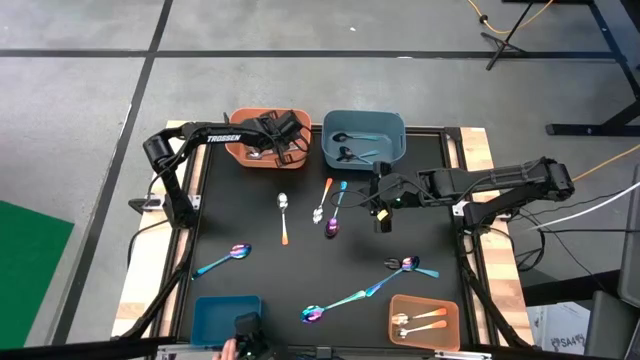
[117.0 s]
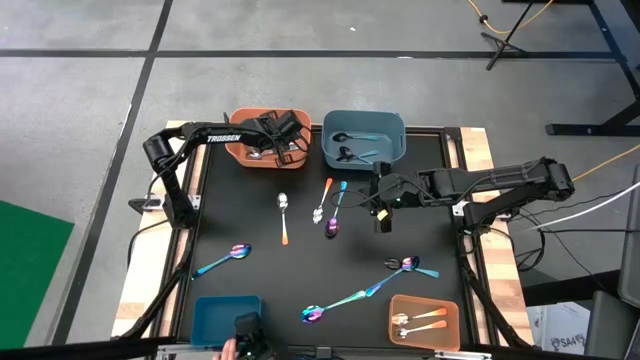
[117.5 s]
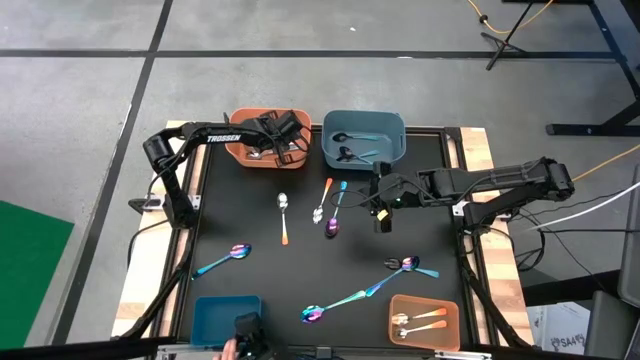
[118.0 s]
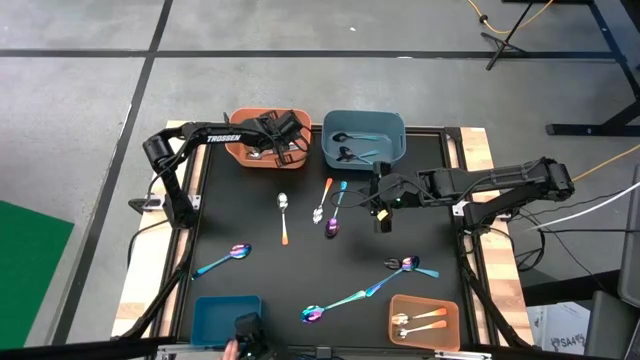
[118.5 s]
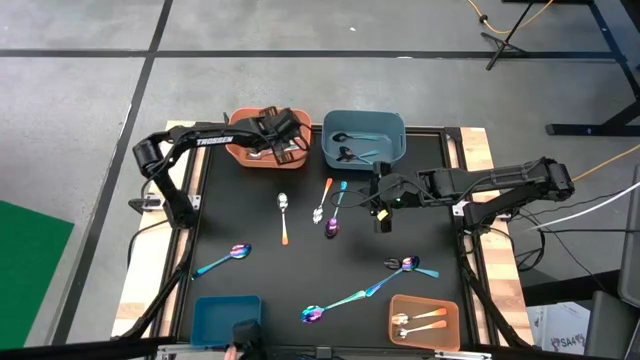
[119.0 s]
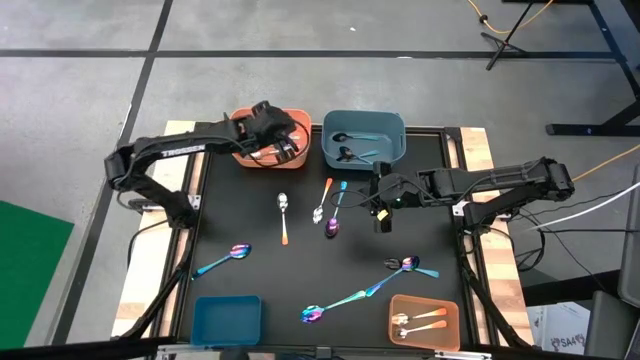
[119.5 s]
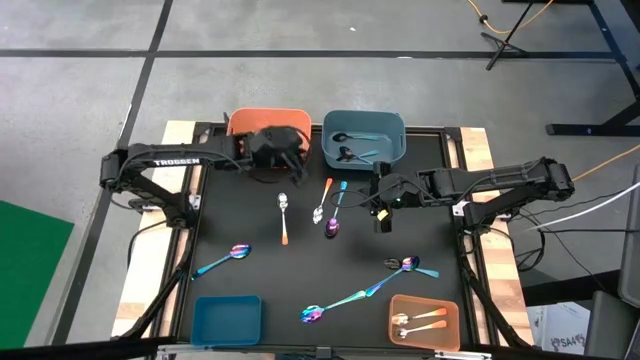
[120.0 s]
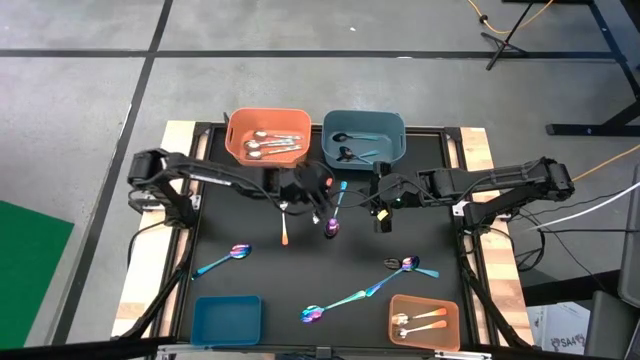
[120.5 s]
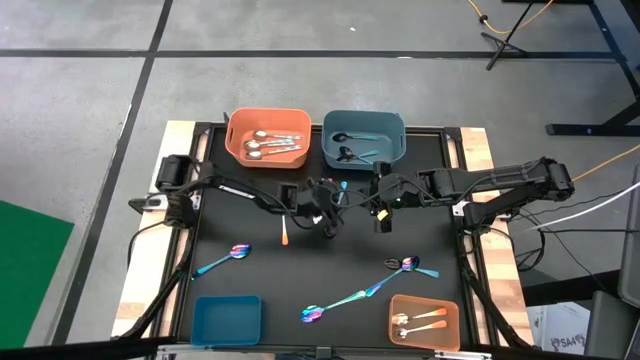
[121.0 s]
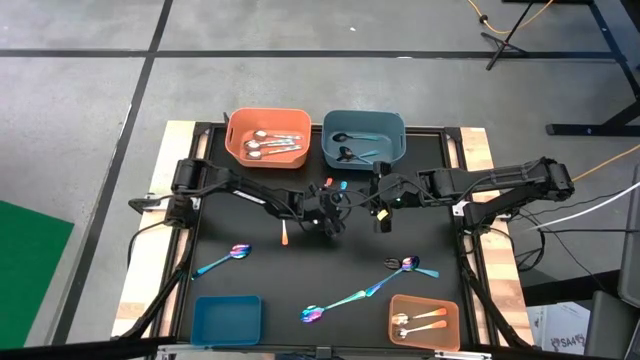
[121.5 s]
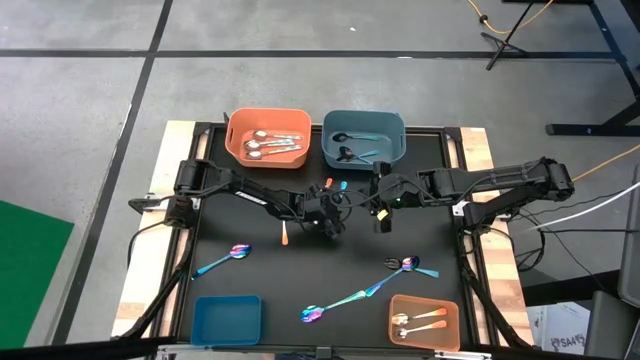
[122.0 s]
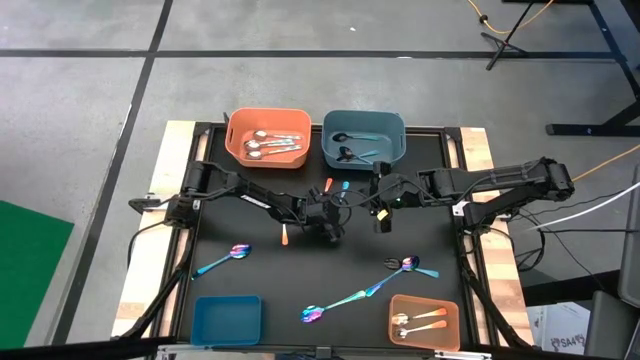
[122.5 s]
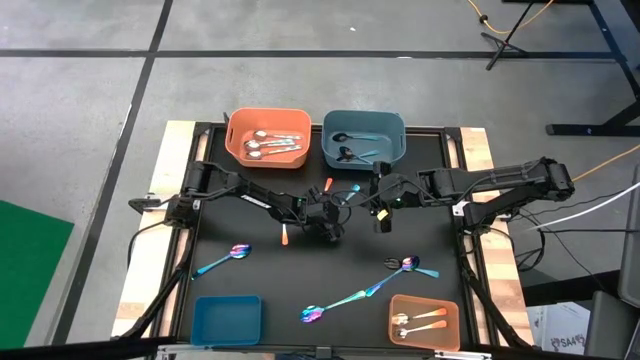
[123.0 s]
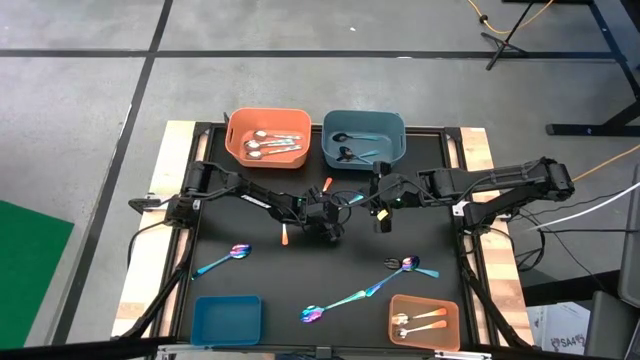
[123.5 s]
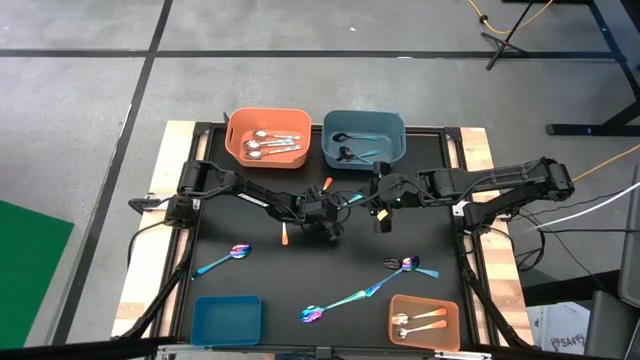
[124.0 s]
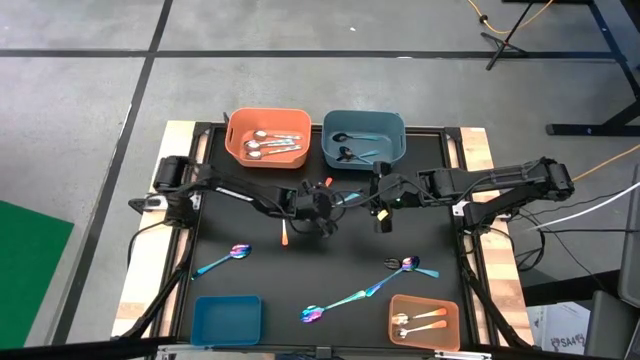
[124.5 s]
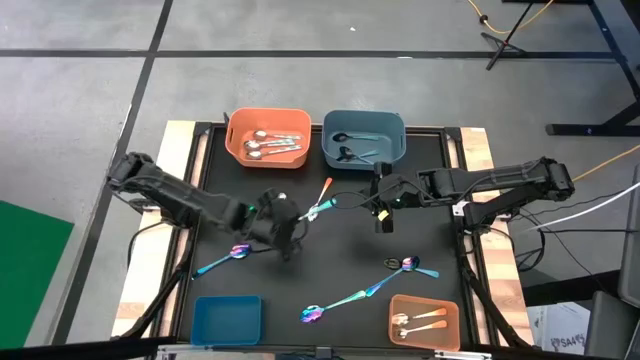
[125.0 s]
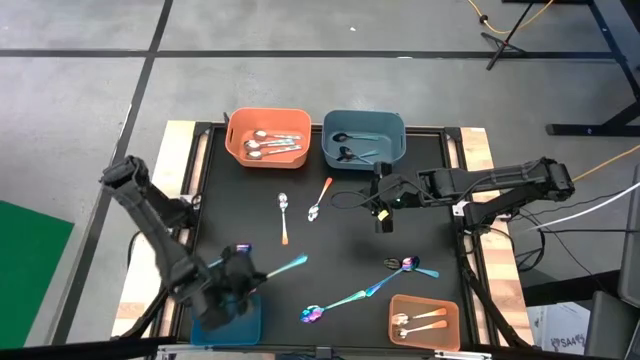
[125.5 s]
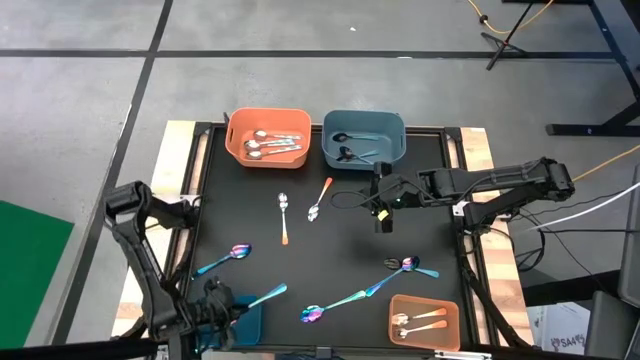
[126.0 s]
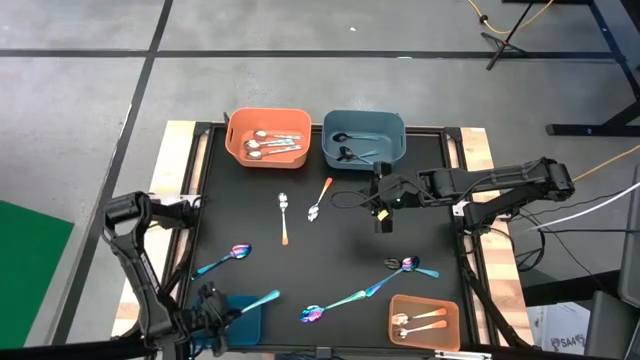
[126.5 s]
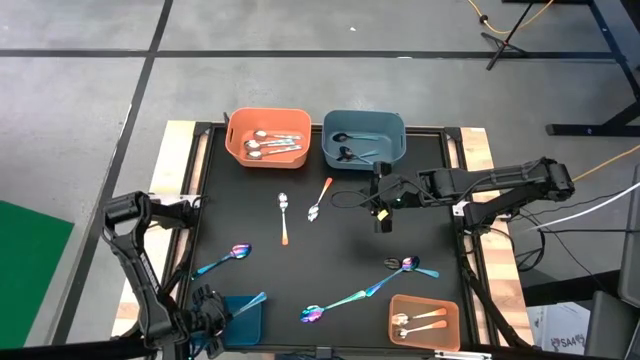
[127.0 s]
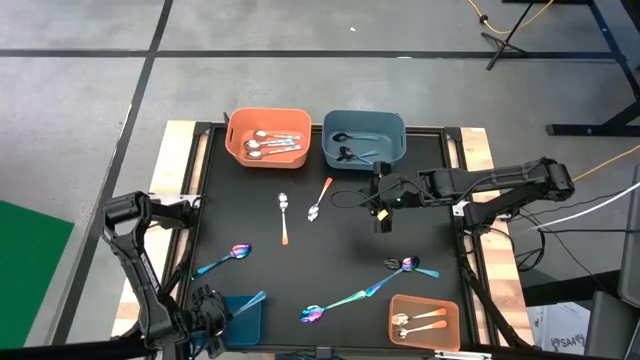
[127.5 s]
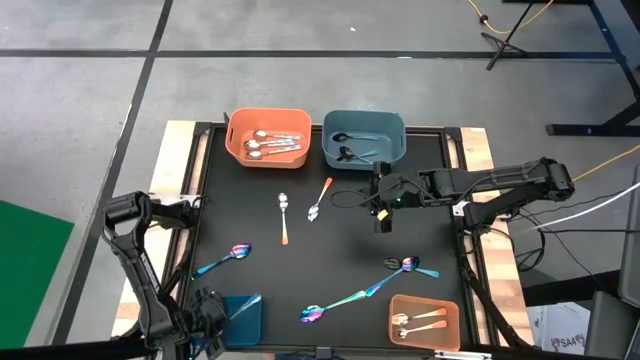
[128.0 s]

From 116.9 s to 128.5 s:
Task: Sort silverware by color (type)
Put the purple spoon into the bottom blue bin

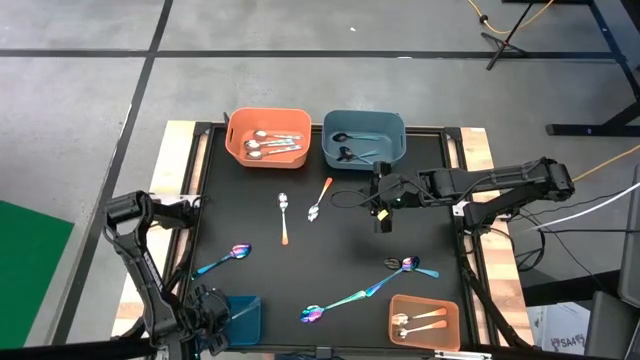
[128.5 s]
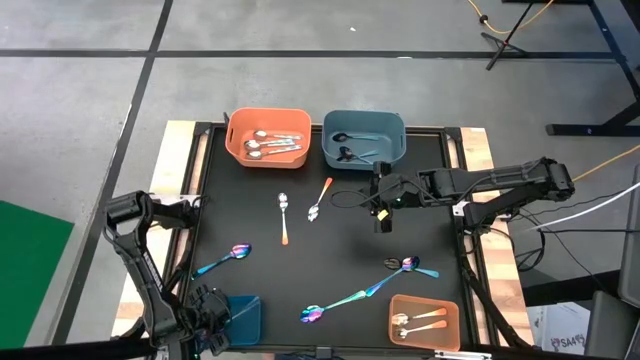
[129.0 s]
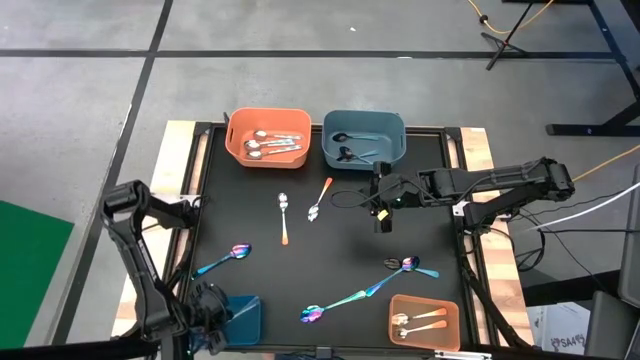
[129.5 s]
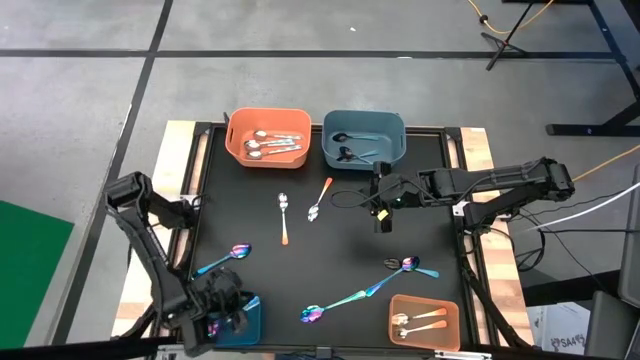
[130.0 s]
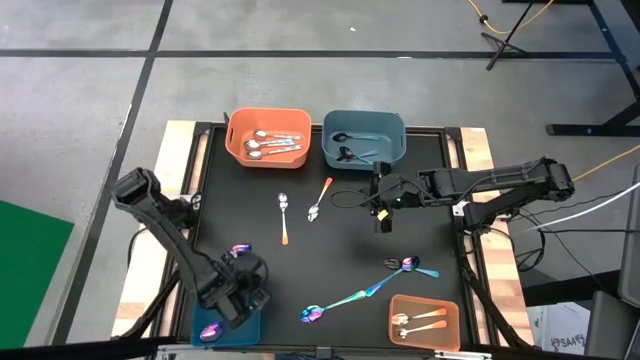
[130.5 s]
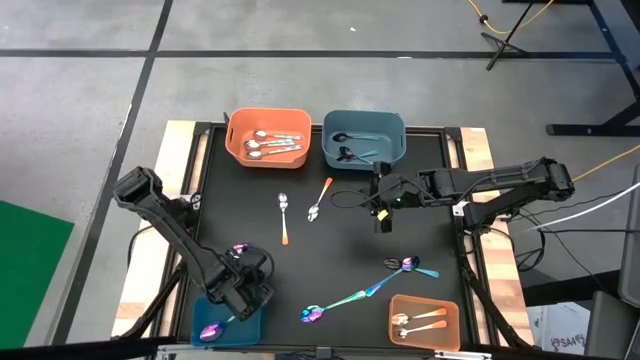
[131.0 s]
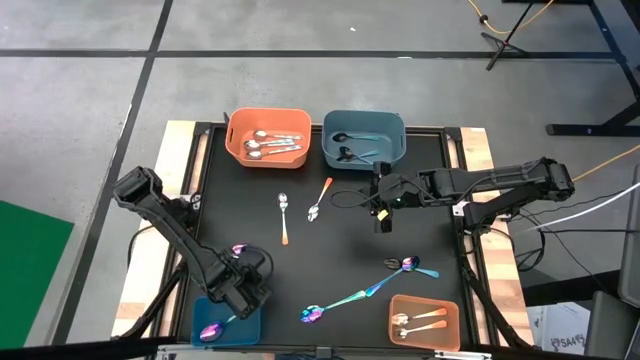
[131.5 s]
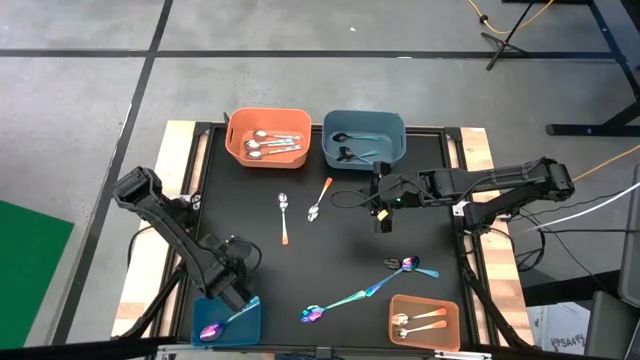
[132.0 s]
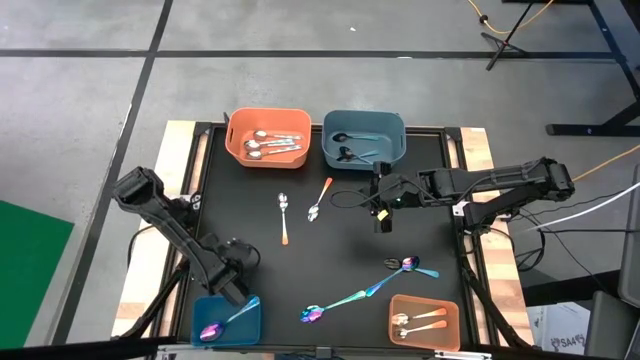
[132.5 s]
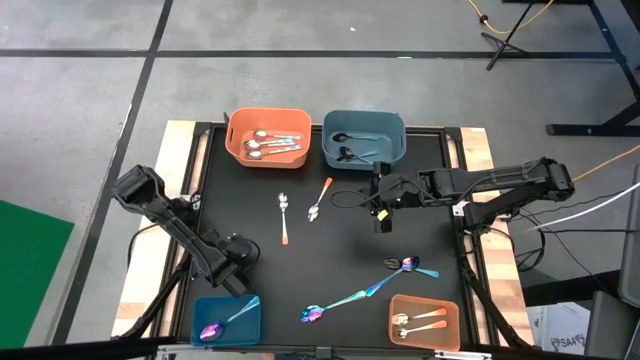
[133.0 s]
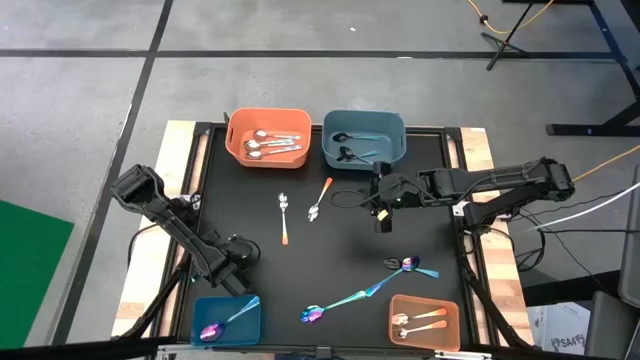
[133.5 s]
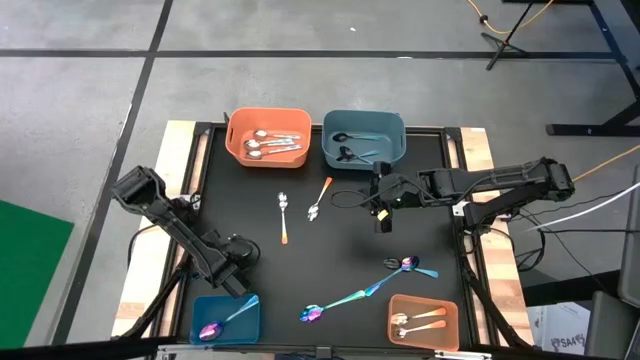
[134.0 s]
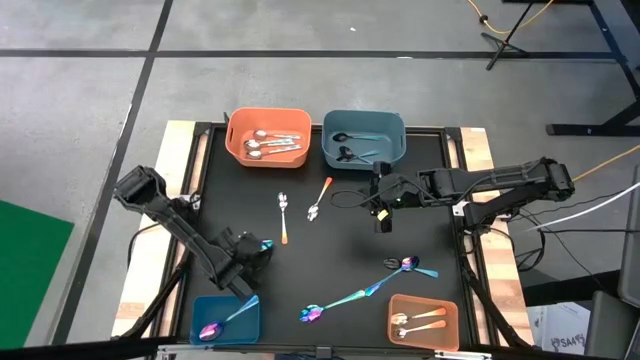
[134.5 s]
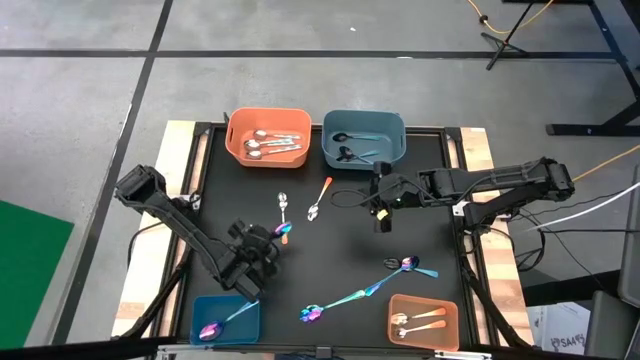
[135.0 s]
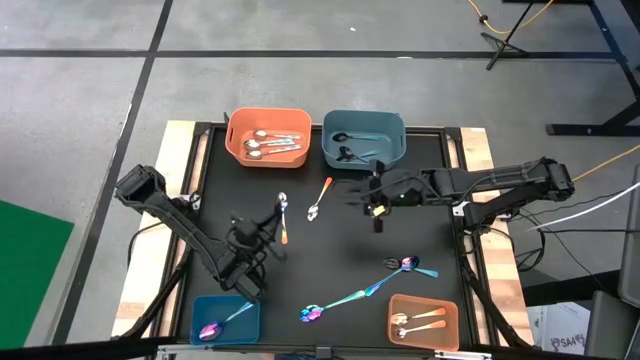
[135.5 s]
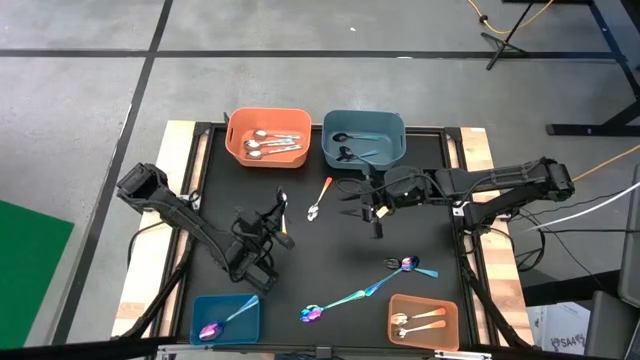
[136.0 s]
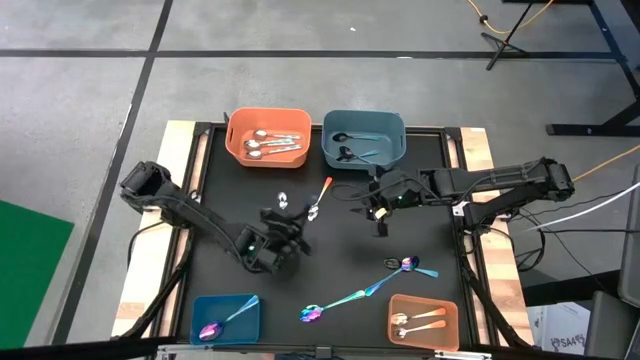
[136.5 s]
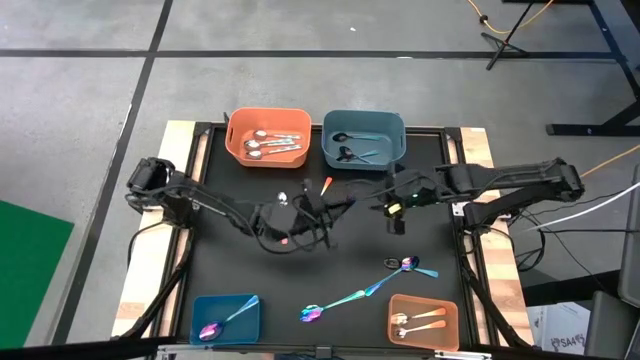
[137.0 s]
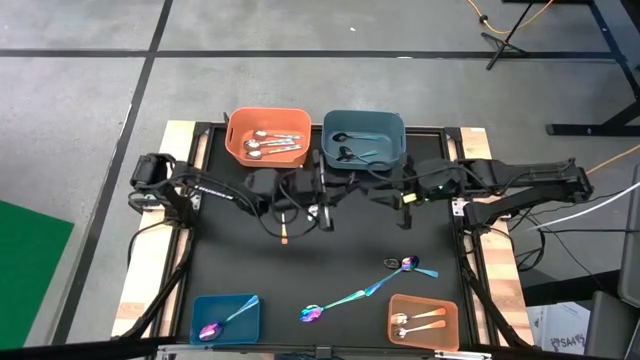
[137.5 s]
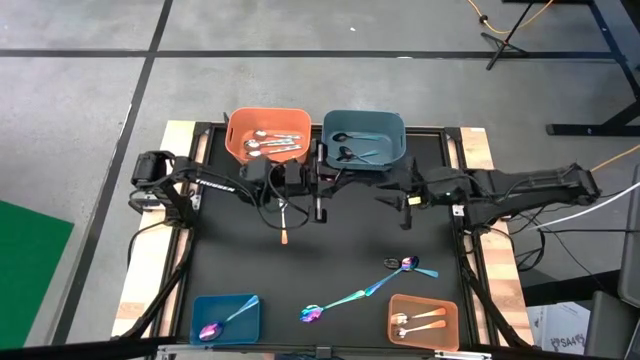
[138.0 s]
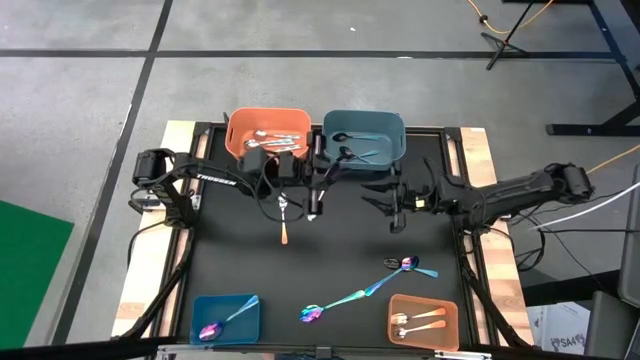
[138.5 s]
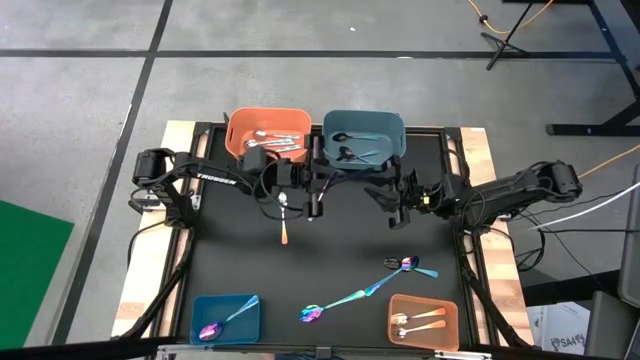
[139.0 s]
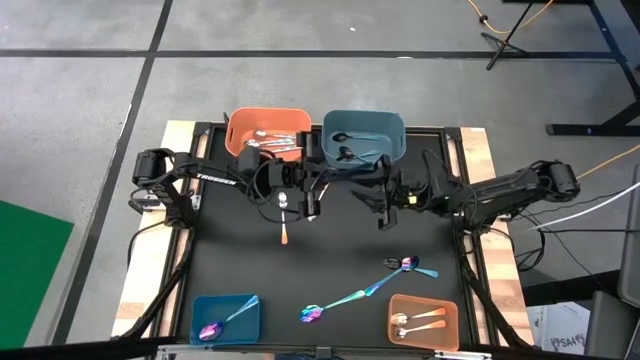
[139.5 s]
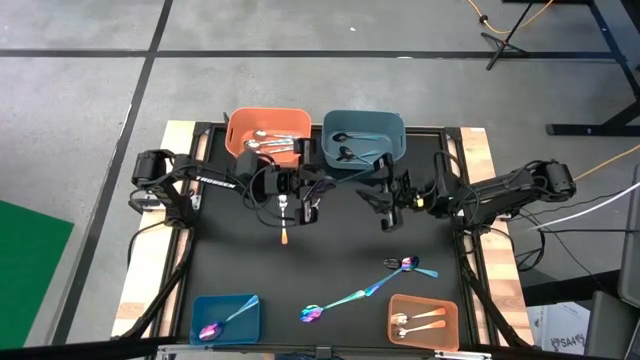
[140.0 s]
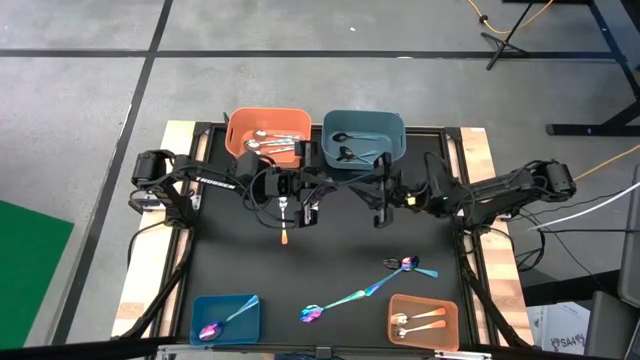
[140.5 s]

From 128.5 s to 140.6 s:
Put the purple spoon into the bottom blue bin
